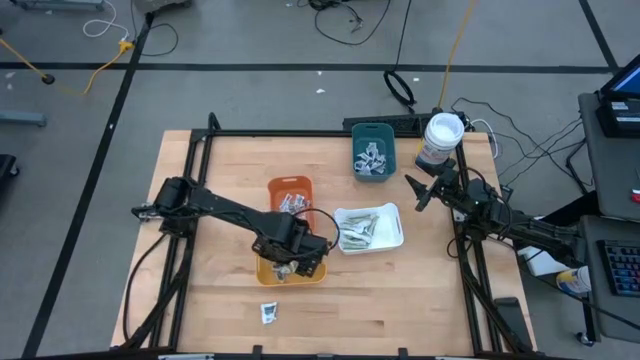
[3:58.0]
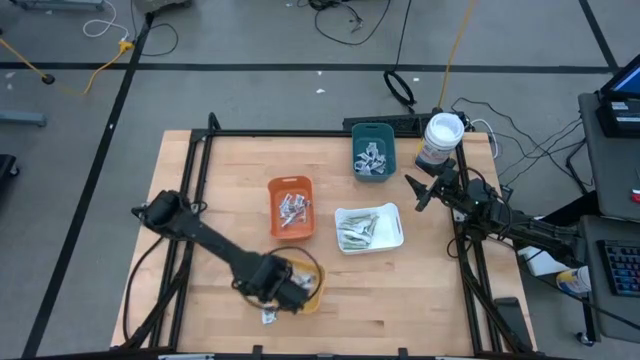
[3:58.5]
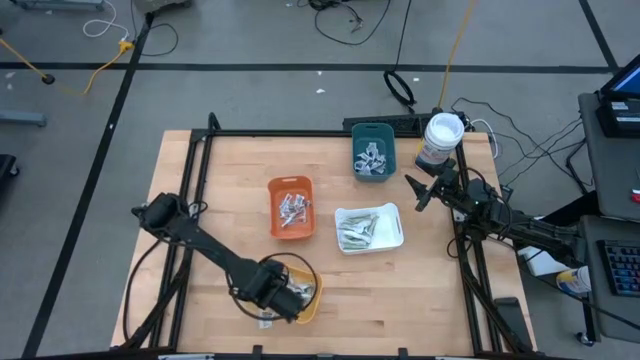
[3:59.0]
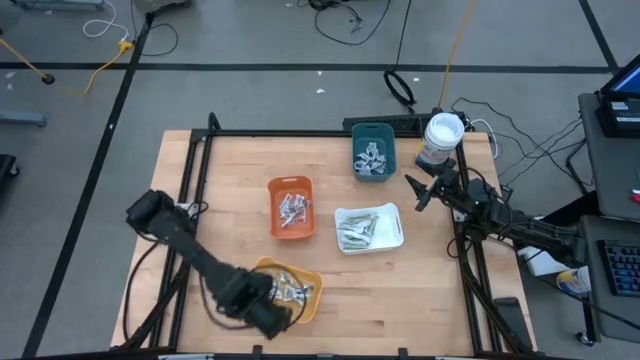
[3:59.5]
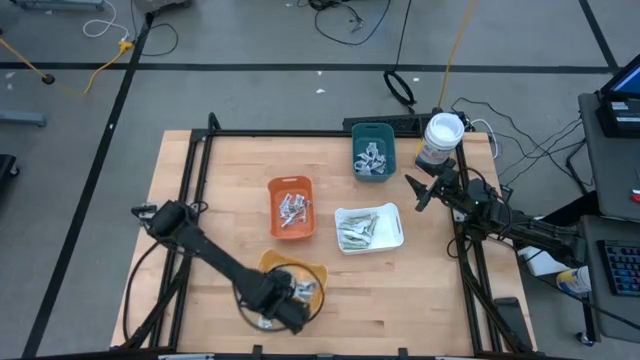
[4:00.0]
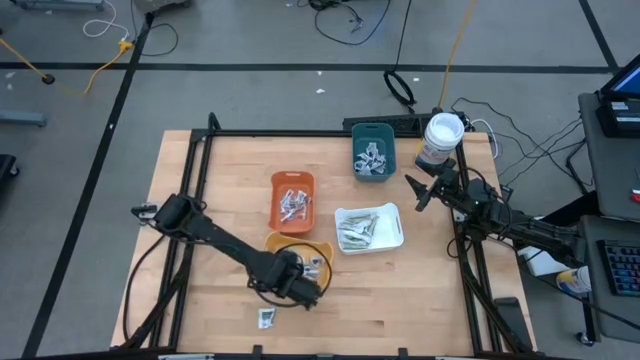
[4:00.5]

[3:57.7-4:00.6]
Task: Pick & Place First Aid Supplies
Adjust the yellow bin on the table

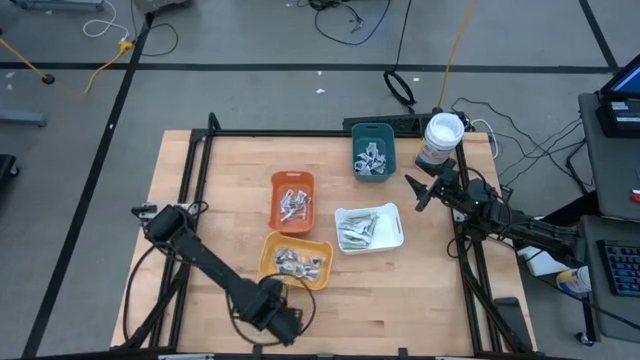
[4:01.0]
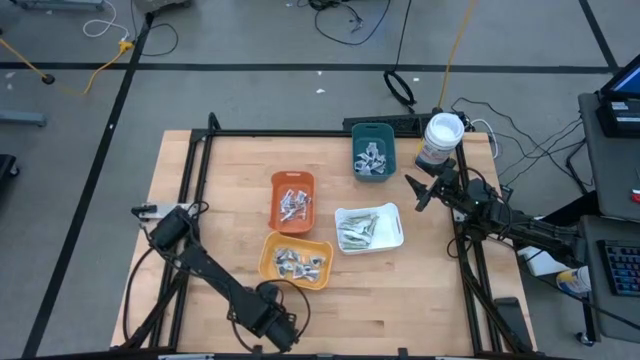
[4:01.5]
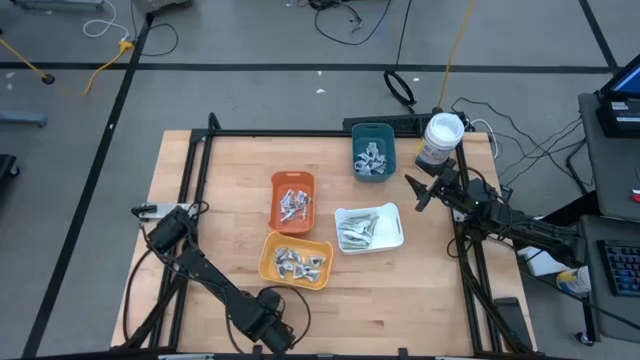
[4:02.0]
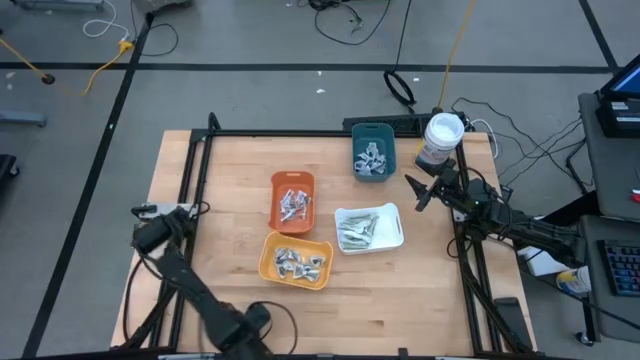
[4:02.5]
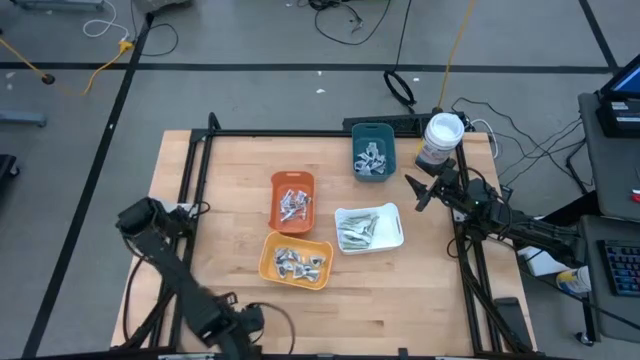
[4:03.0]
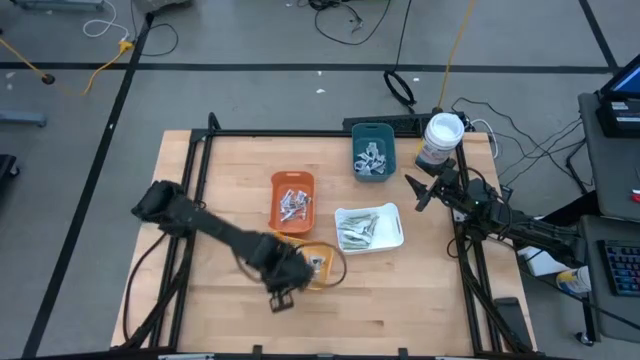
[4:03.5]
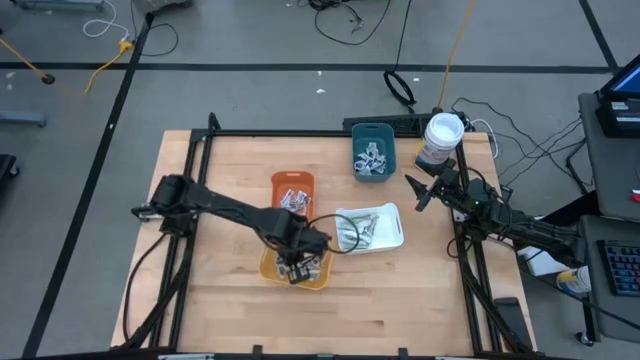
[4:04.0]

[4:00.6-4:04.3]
Put the gray sachet into the yellow bin

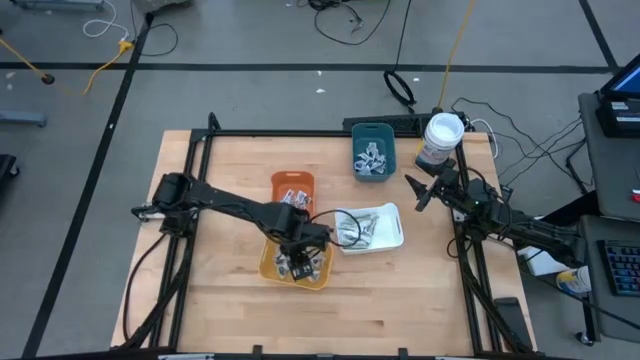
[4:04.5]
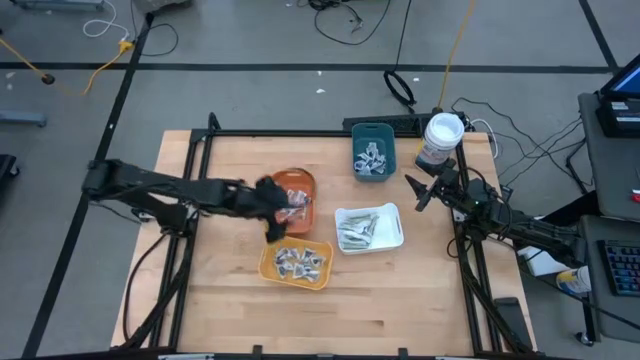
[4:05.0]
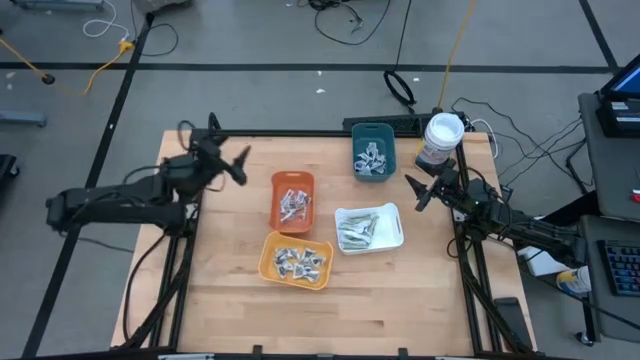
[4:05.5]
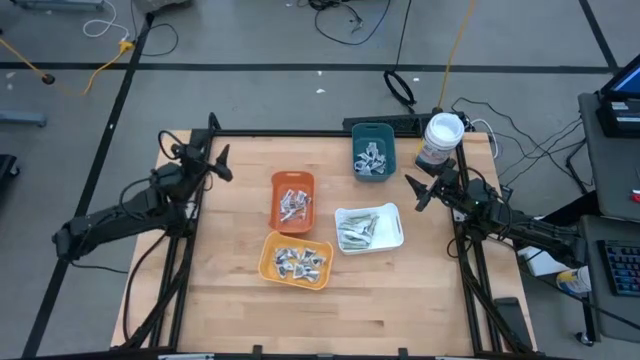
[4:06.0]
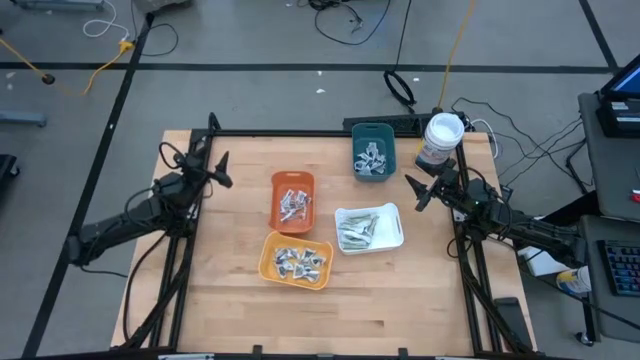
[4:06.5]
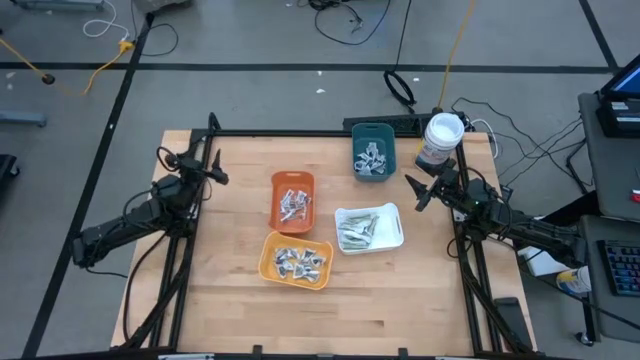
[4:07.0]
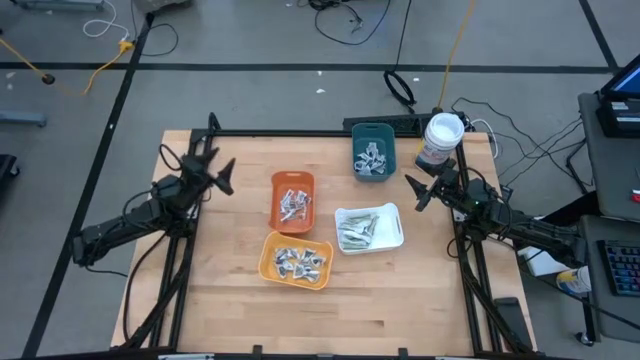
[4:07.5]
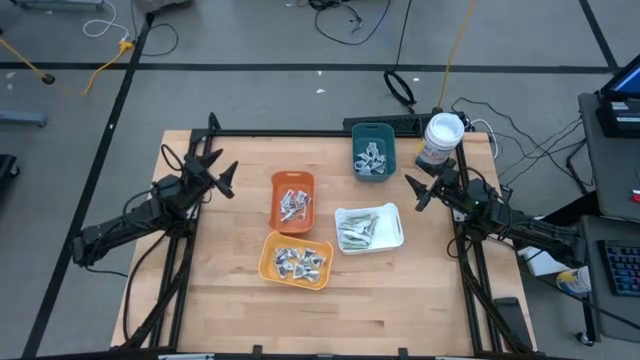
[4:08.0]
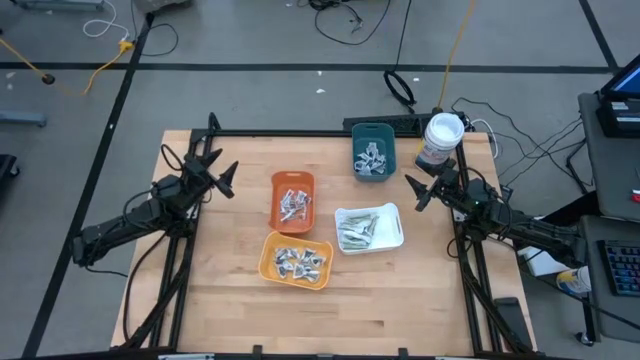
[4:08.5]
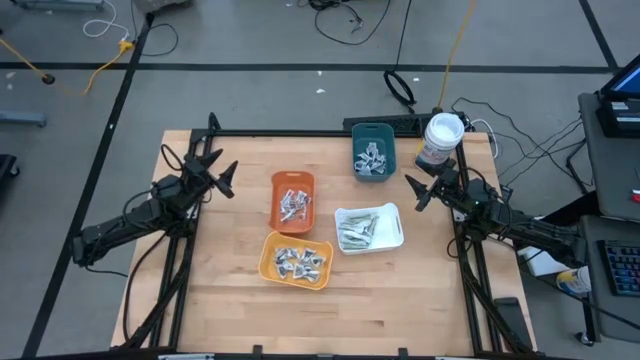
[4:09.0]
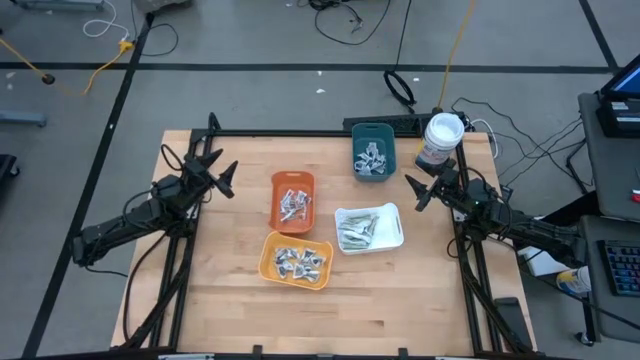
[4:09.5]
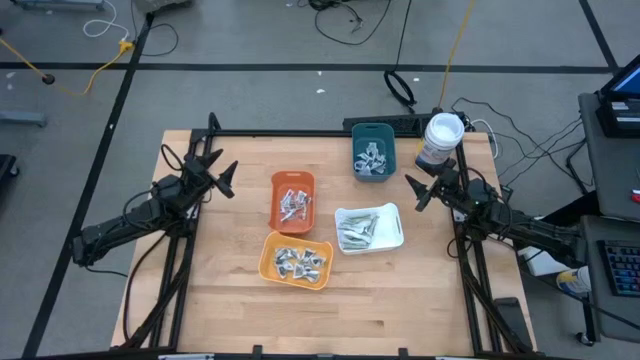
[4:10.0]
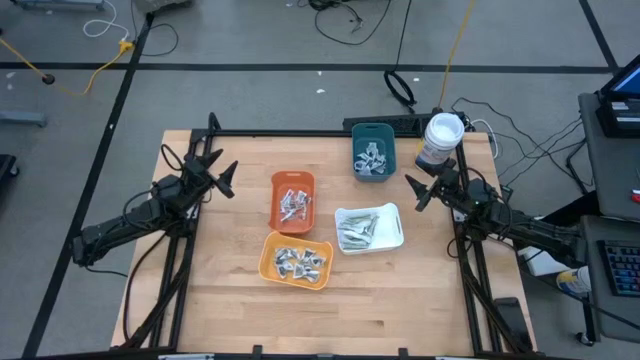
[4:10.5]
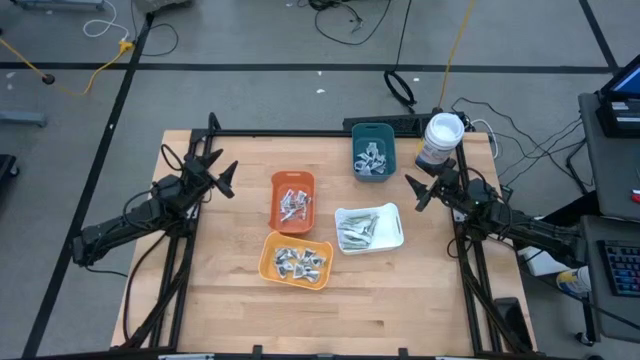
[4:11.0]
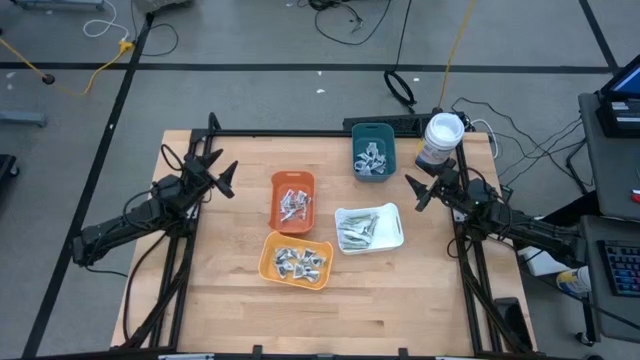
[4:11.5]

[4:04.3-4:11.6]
Return to Home Position

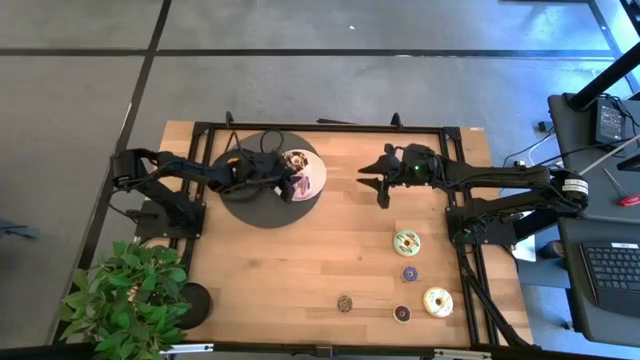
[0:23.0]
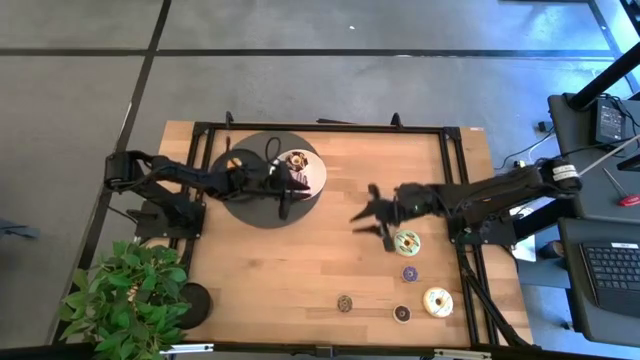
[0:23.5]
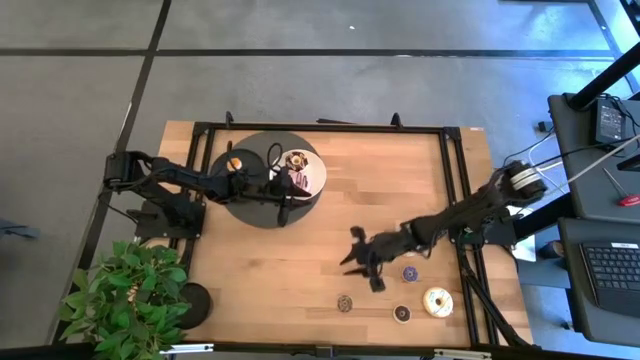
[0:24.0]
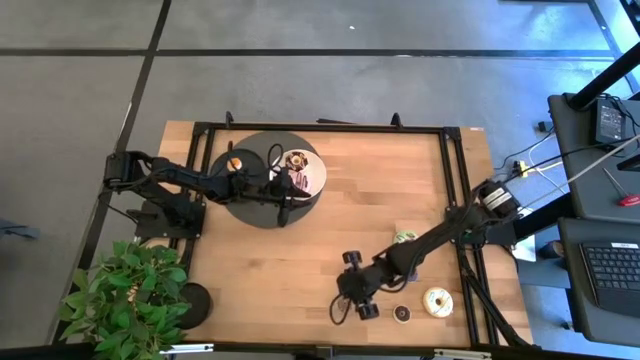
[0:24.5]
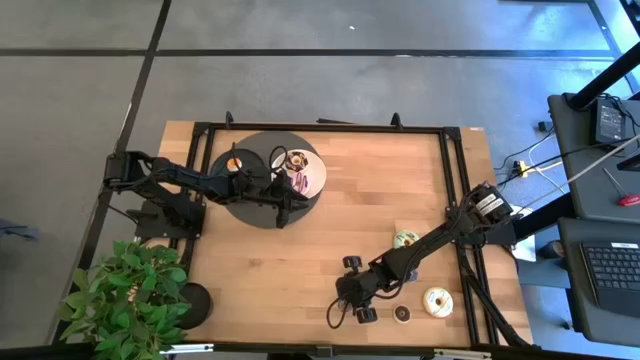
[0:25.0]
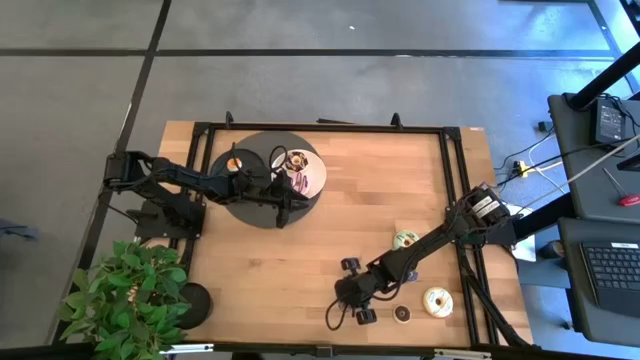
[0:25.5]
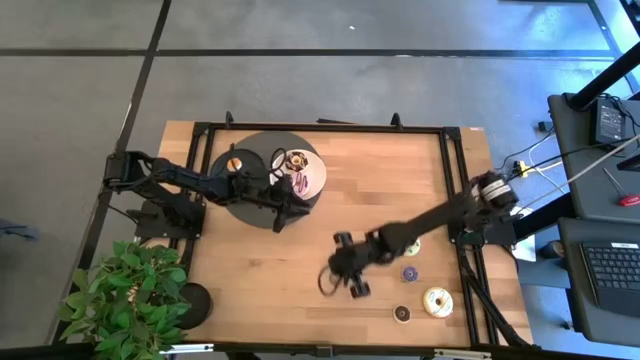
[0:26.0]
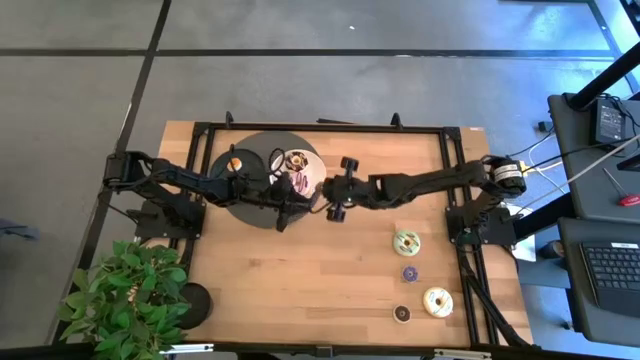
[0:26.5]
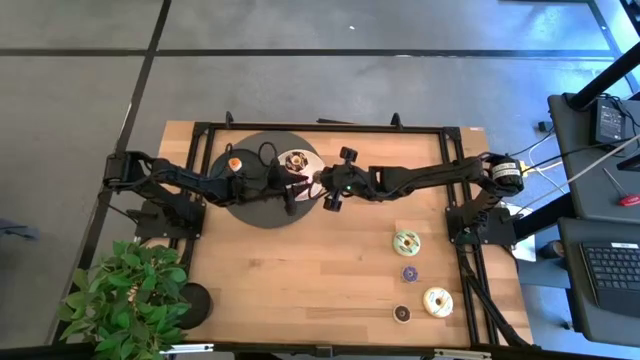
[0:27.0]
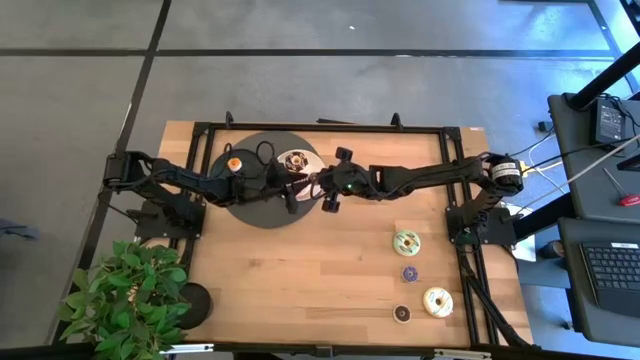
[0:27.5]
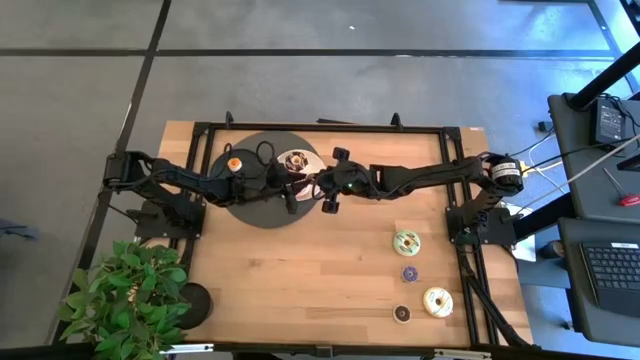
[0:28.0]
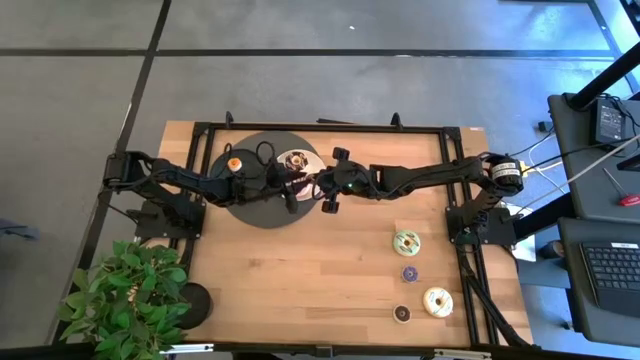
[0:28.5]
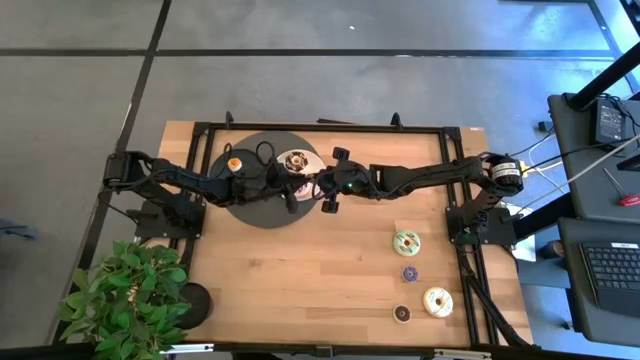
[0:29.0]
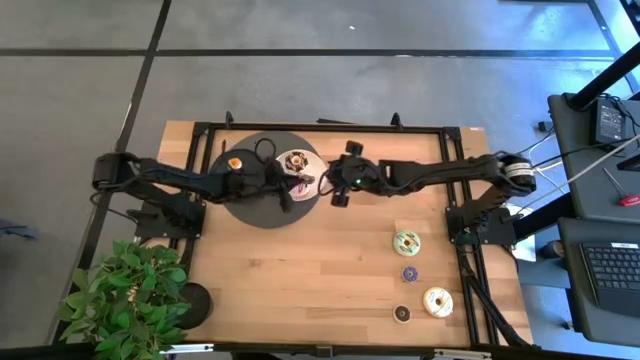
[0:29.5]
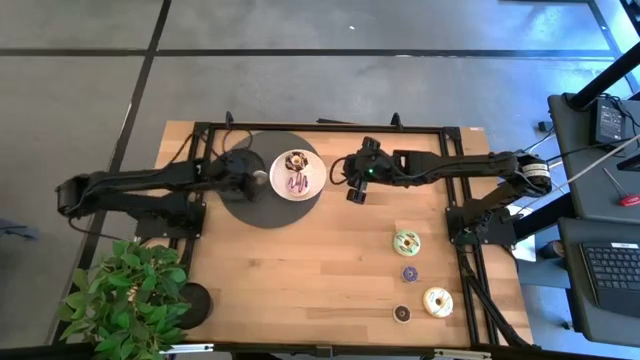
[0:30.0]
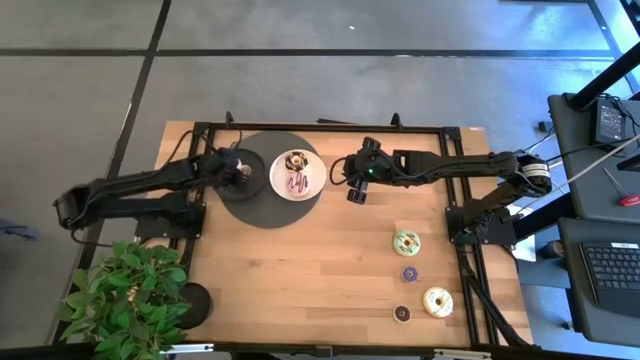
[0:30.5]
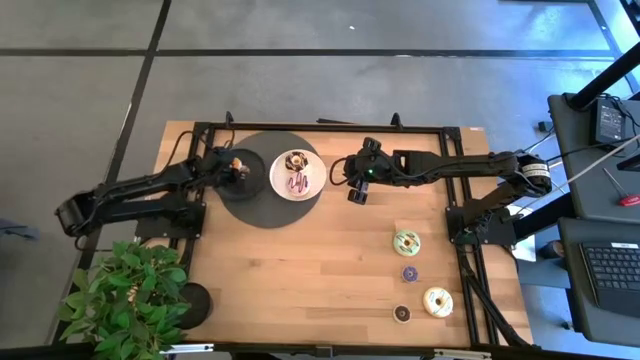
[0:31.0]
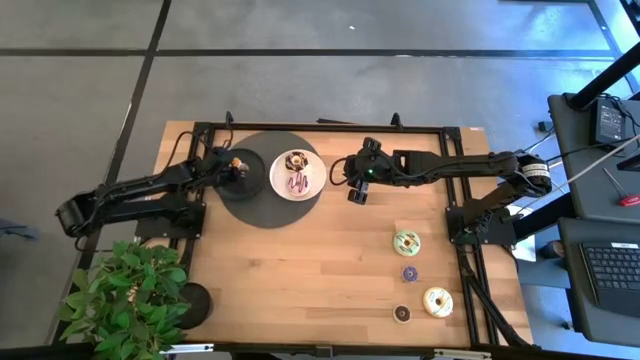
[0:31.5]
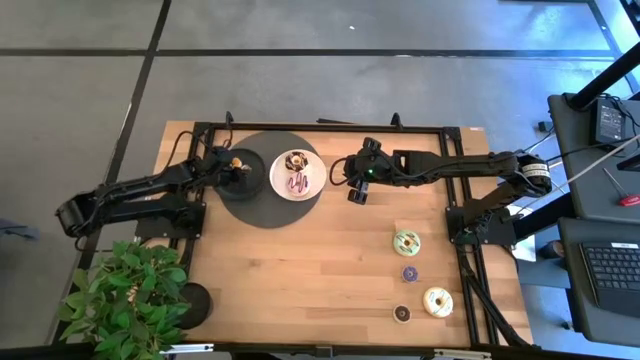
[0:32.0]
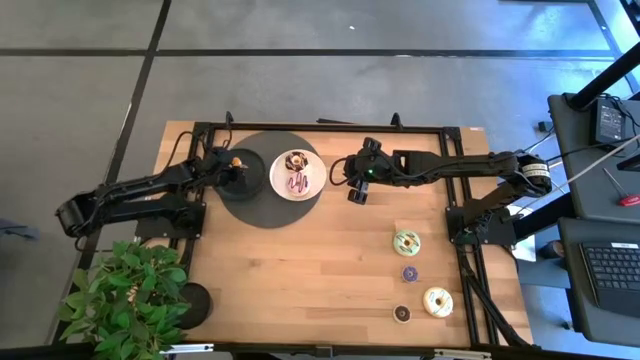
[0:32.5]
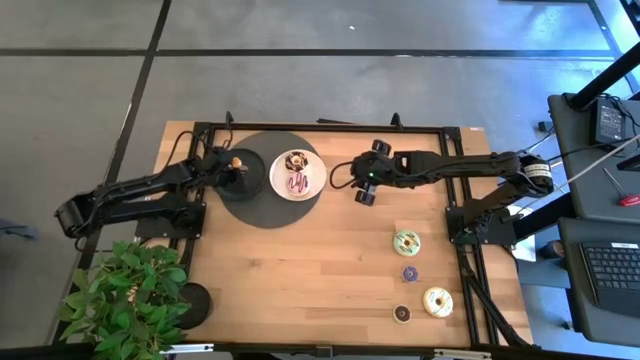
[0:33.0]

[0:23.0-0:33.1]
Task: Pick & Place donuts
Put the small brown donut on the black plate
